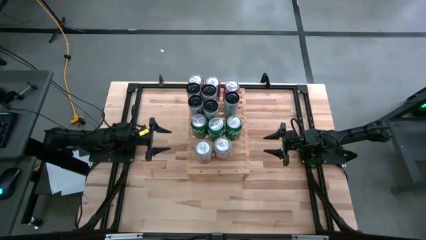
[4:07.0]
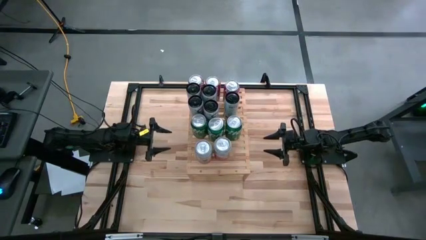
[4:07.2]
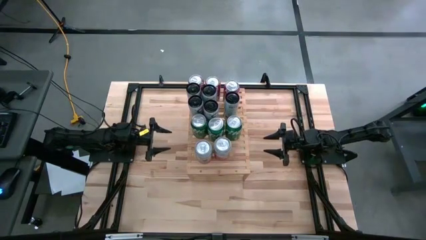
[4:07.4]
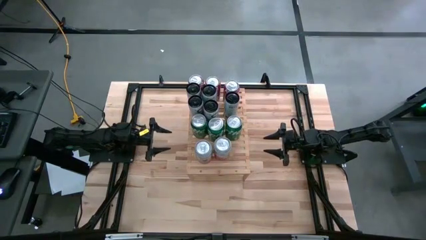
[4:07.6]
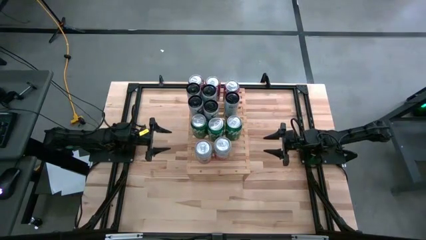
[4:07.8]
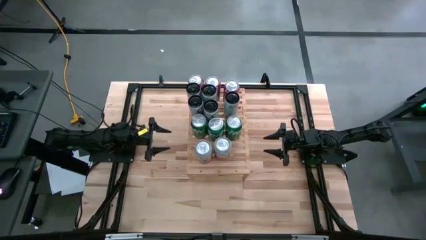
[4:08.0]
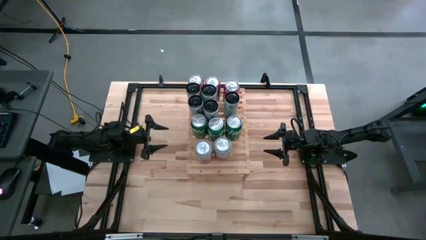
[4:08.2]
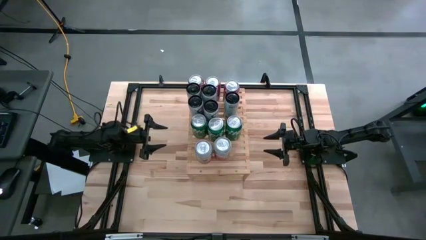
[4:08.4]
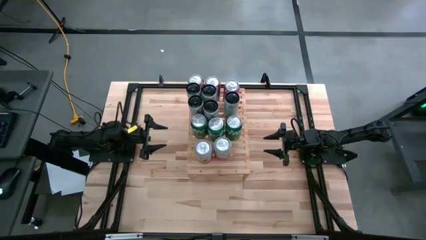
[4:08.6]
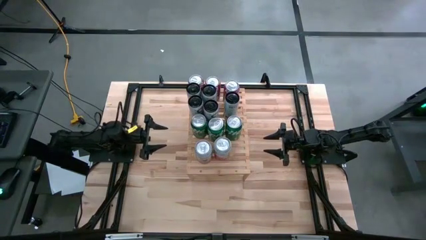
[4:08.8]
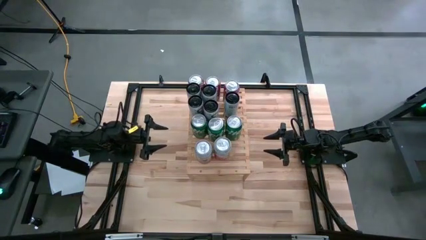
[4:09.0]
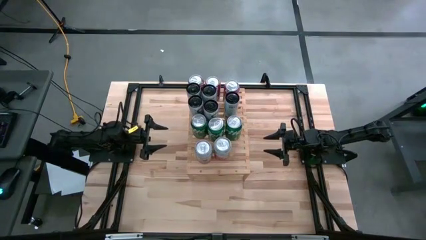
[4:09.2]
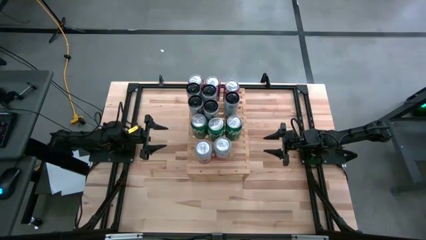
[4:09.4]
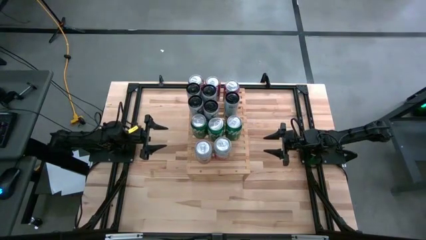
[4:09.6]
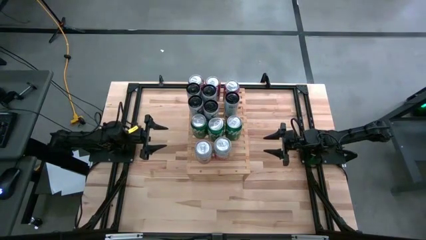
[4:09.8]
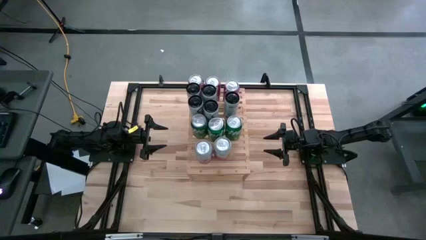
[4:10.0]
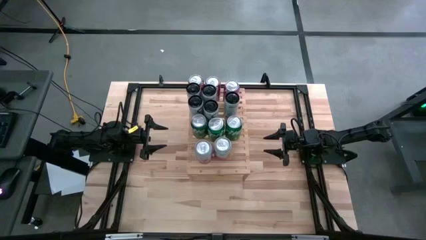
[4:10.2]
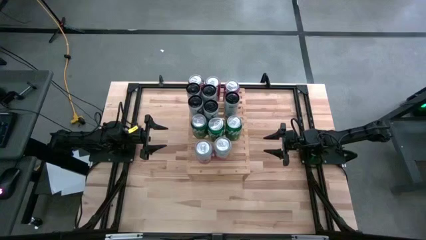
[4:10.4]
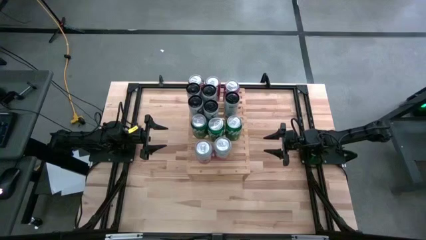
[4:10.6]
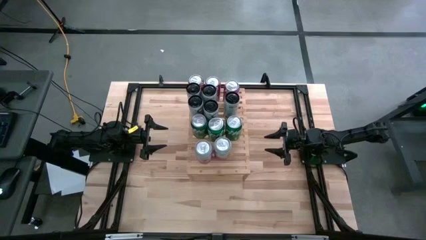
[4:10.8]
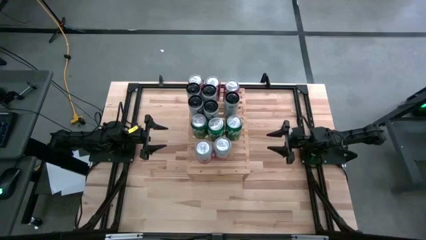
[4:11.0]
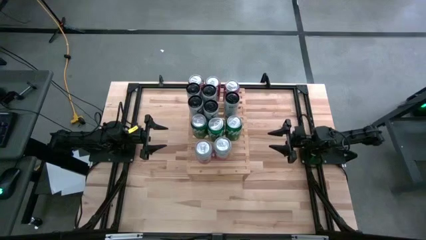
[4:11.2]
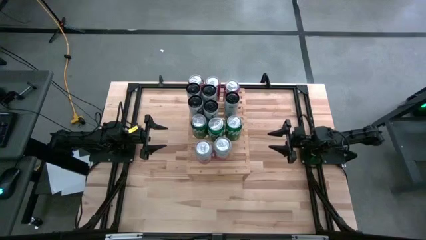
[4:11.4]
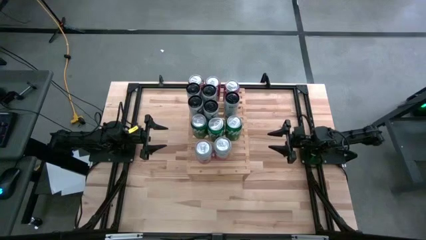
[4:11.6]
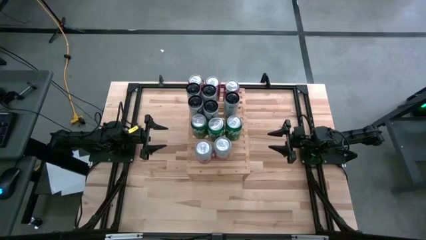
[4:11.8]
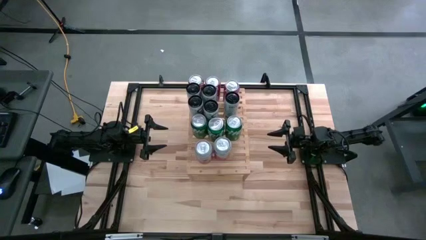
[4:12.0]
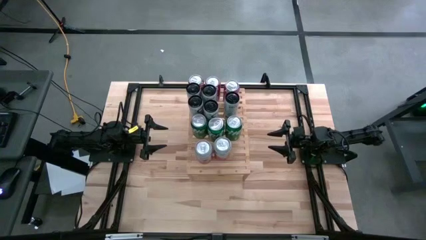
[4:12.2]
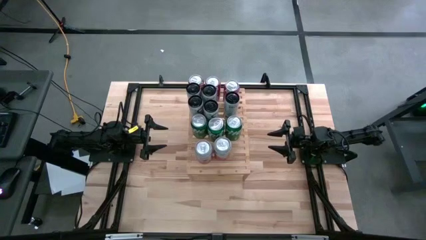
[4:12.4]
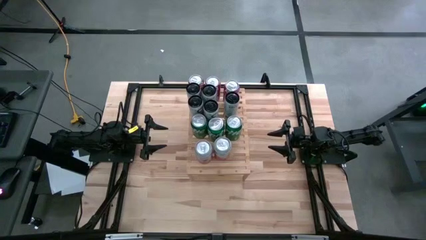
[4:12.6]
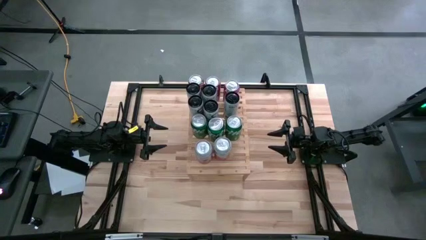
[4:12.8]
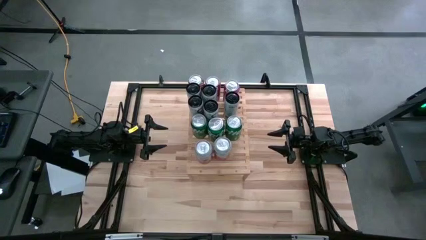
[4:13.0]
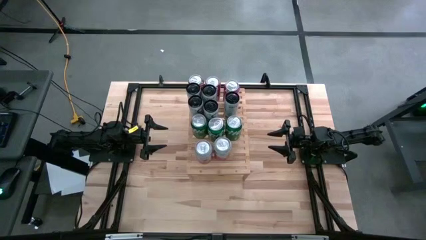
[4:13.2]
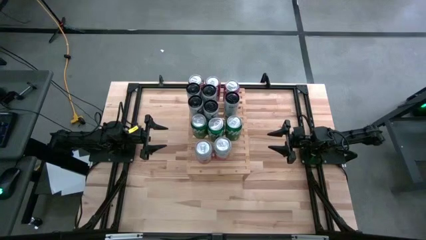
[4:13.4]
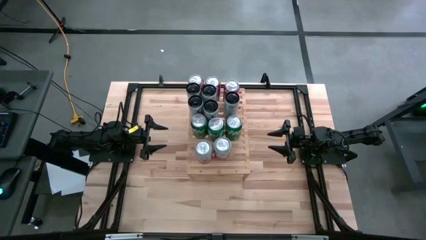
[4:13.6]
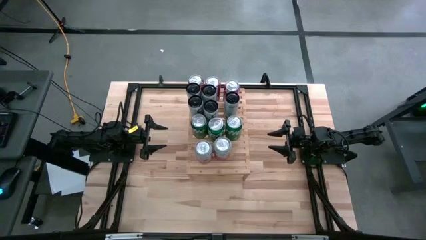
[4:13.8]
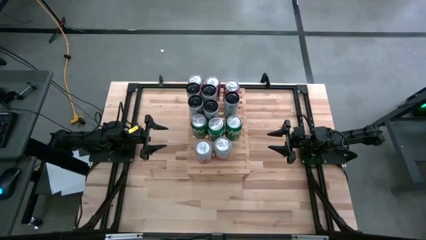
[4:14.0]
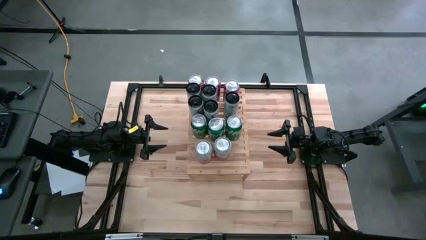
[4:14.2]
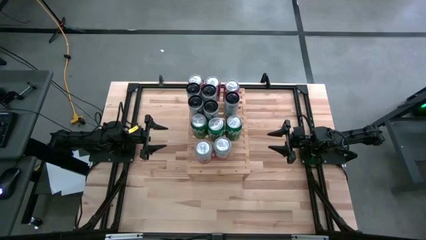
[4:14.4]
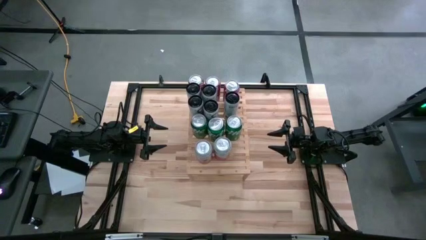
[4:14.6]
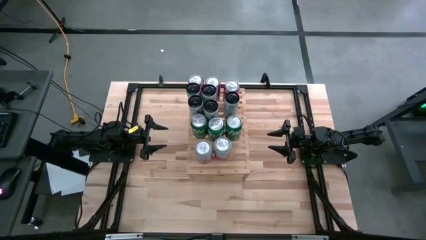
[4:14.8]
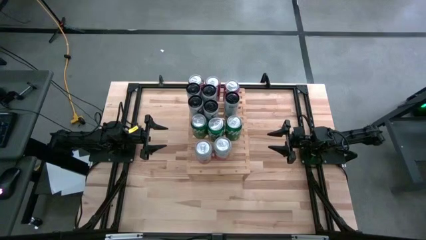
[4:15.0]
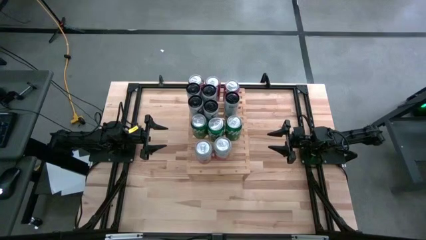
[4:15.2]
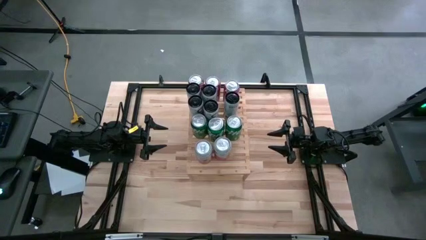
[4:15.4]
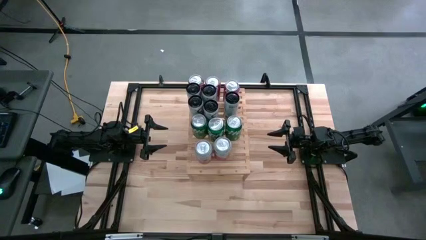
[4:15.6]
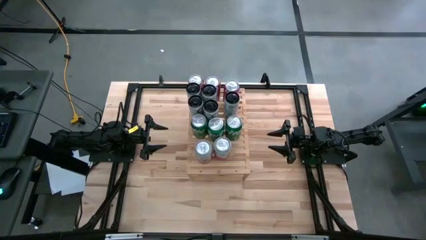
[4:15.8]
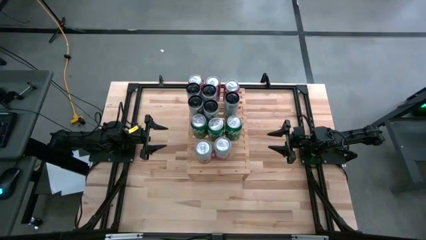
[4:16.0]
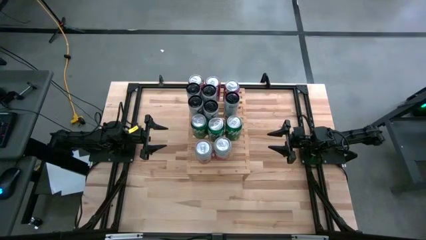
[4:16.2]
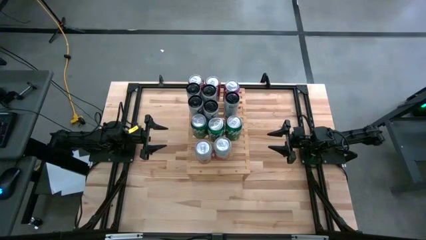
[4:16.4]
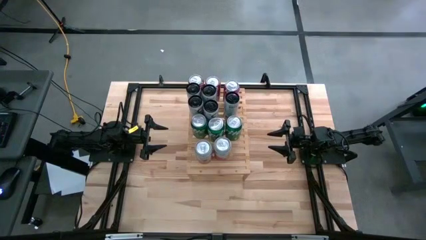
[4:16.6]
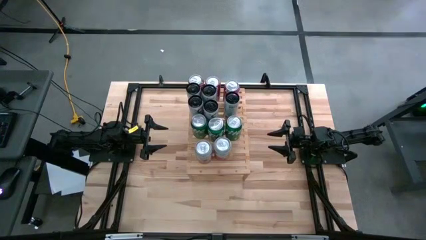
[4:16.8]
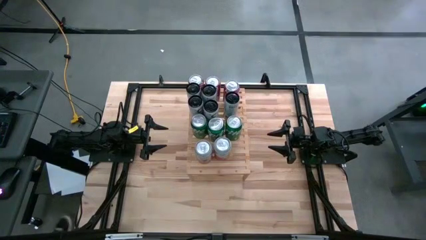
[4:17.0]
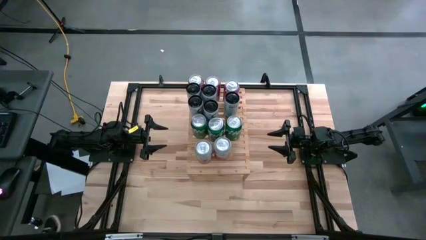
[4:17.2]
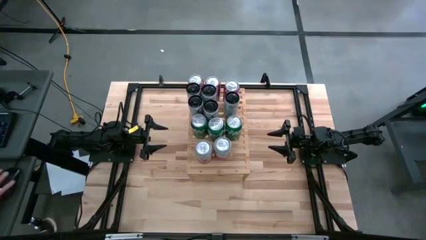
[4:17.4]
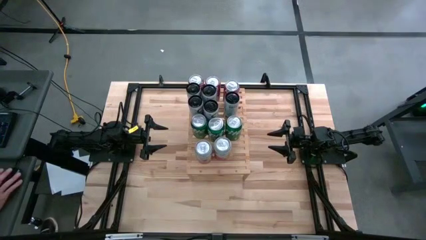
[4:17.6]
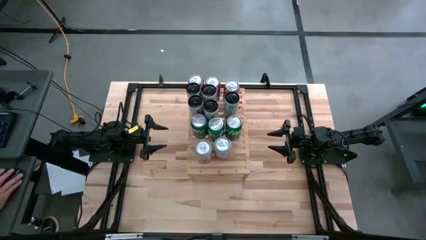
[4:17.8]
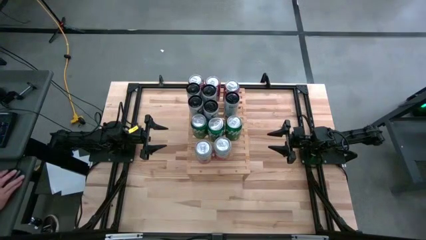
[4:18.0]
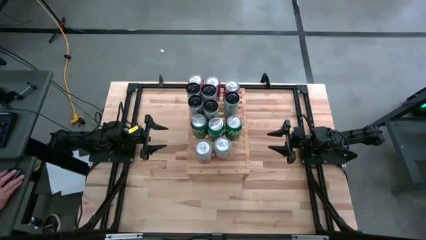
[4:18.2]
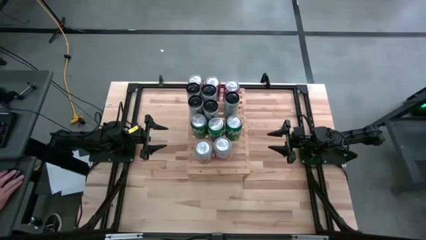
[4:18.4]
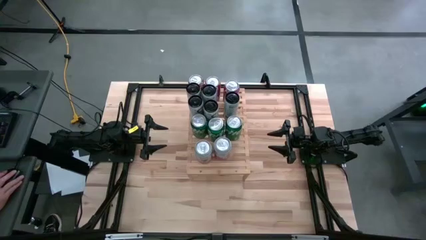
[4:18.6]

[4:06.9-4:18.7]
Task: Place canned beverage on shelf
Return to home position

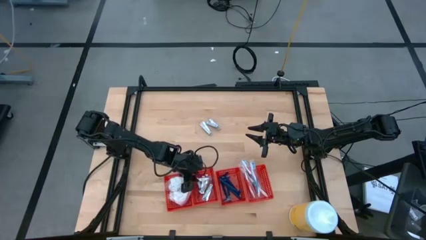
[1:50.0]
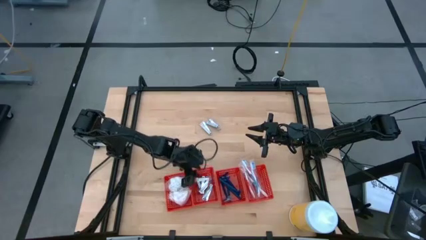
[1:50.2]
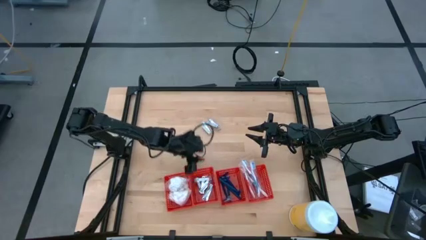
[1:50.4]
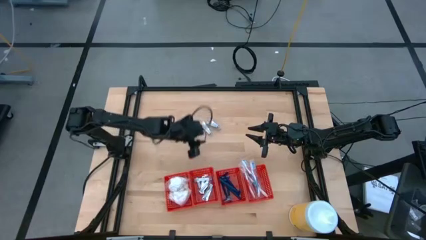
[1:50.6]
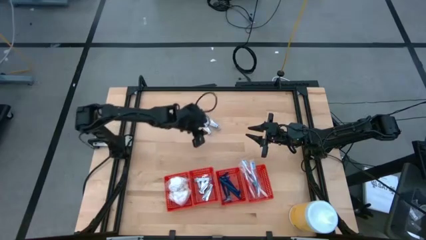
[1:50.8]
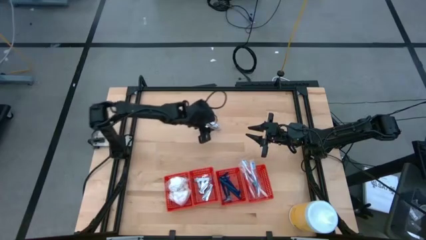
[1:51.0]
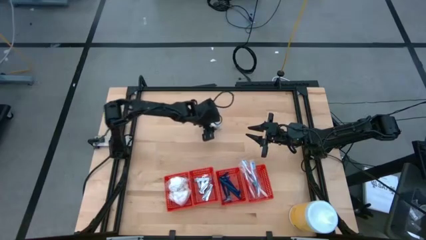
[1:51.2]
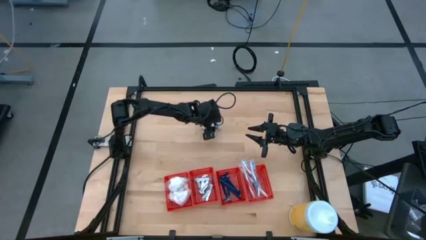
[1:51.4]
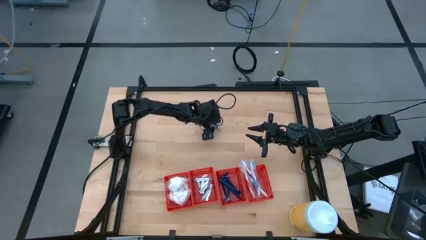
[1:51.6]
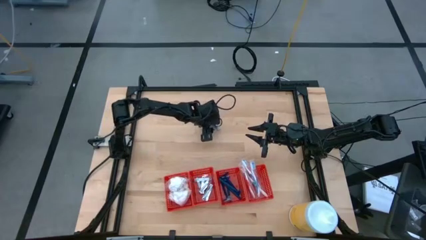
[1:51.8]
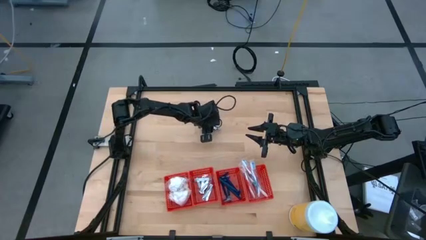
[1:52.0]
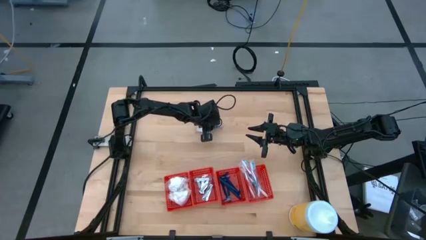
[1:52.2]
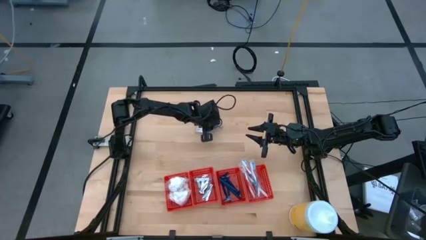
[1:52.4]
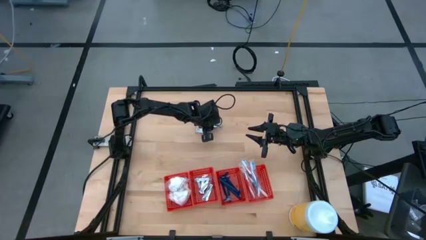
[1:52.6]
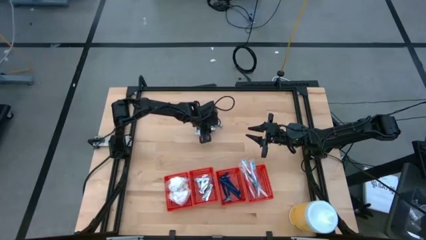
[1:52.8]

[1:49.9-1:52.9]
Task: Pick & Place Travel size toiletries
Put the silver nail cutter into the middle left red bin

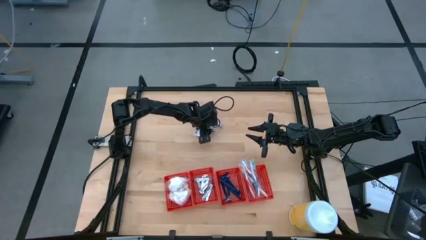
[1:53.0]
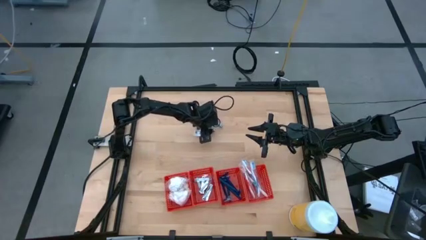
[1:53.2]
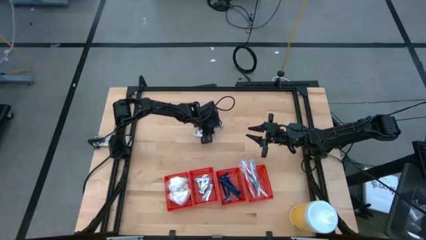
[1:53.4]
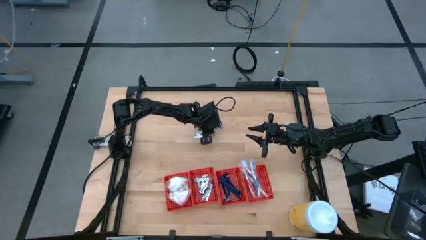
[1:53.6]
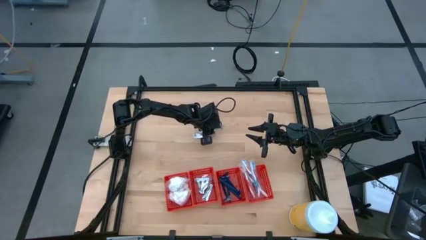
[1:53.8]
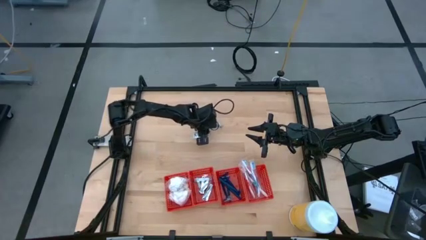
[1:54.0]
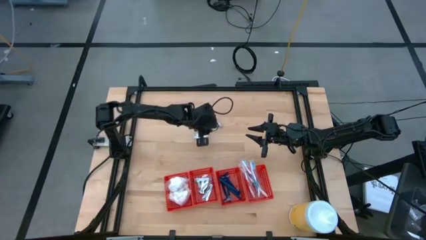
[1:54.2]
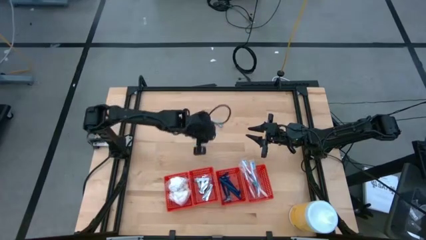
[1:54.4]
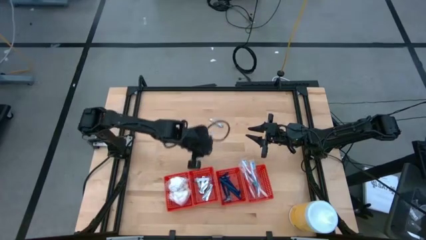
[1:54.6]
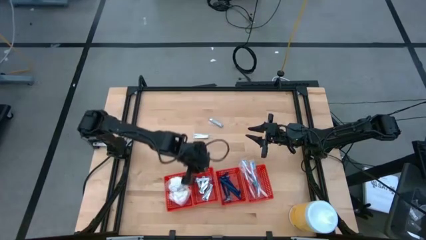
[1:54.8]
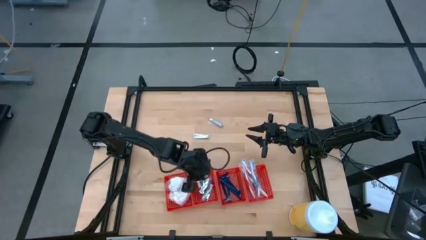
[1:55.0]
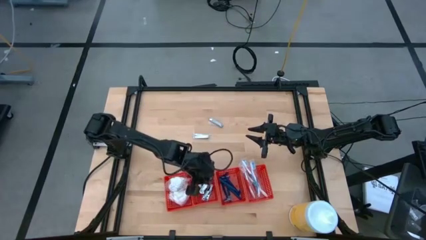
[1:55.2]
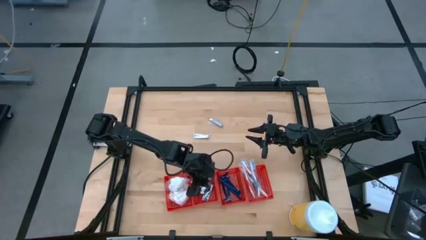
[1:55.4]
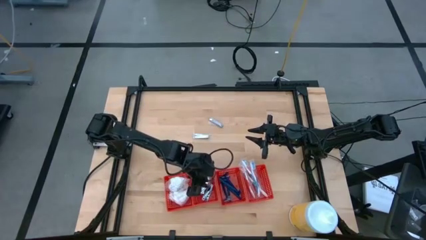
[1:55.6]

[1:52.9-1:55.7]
Put the silver nail cutter into the middle left red bin
